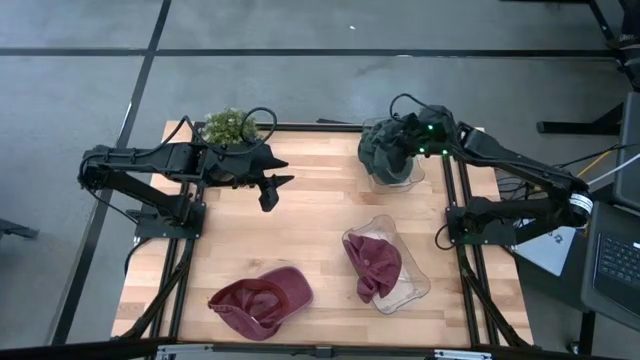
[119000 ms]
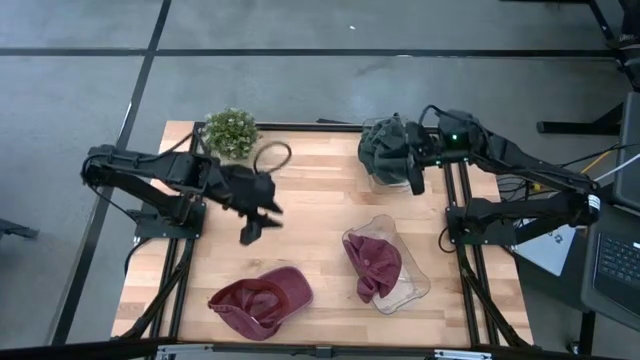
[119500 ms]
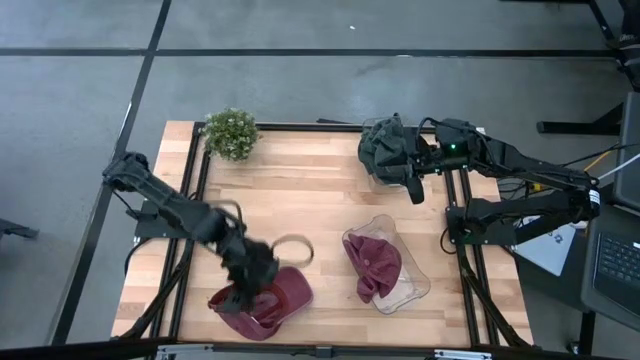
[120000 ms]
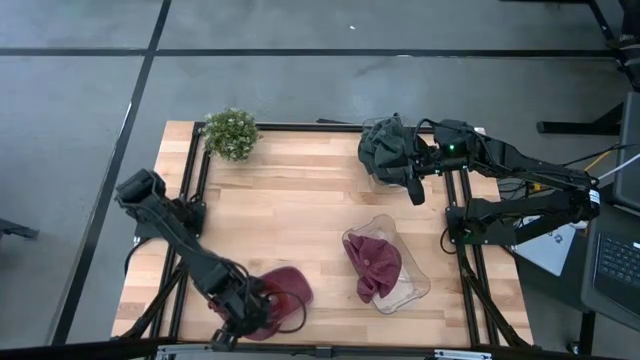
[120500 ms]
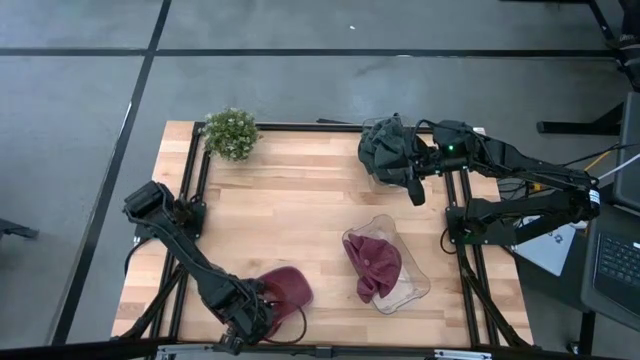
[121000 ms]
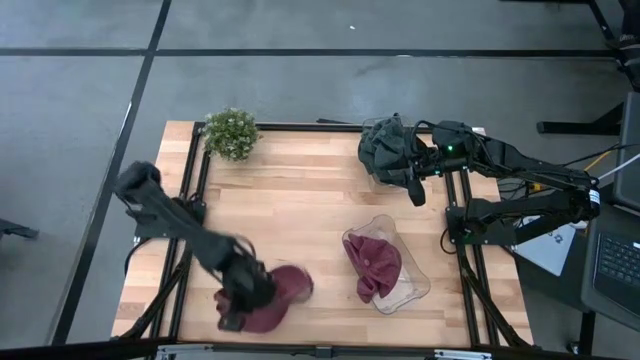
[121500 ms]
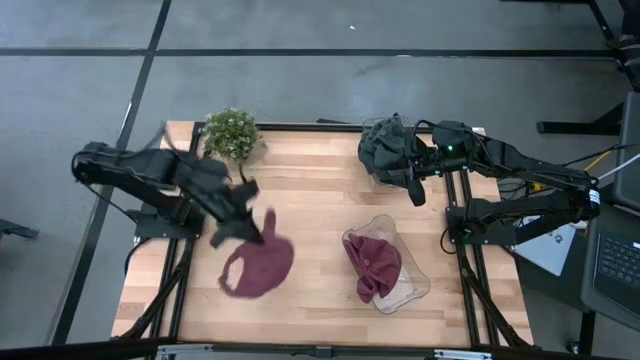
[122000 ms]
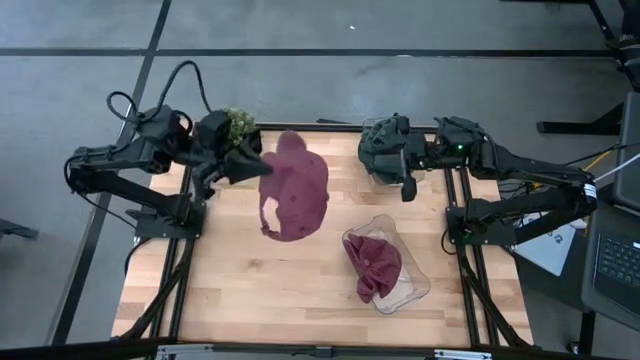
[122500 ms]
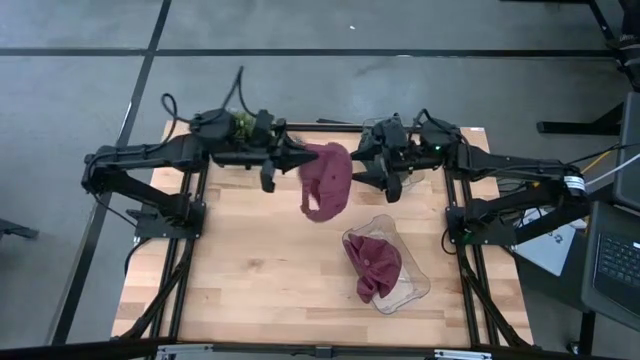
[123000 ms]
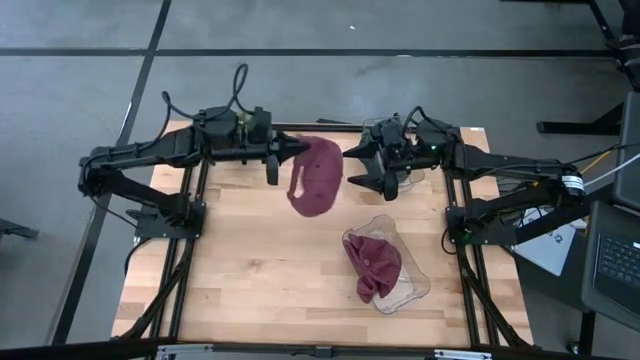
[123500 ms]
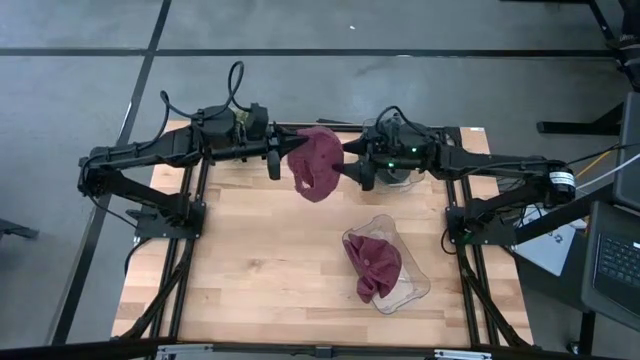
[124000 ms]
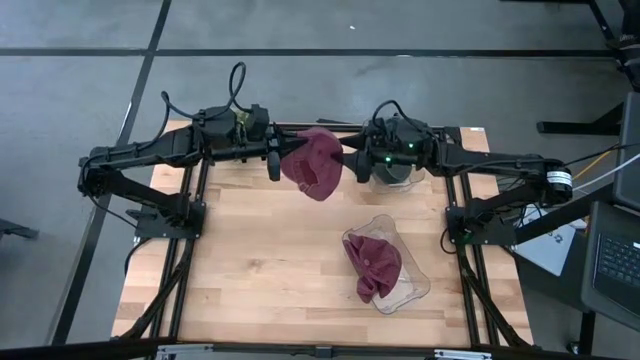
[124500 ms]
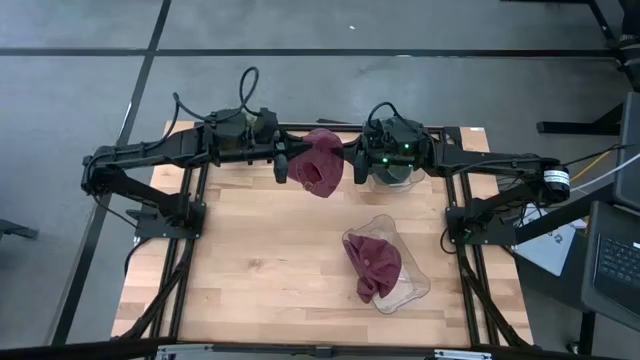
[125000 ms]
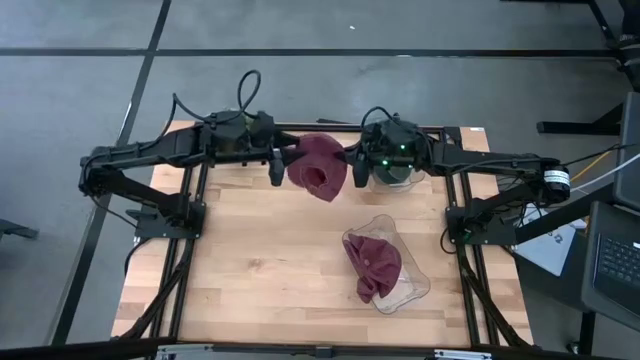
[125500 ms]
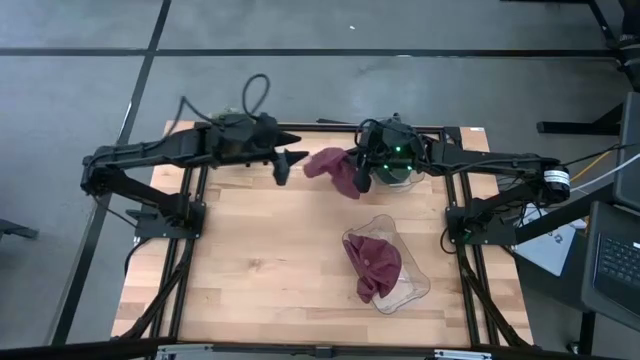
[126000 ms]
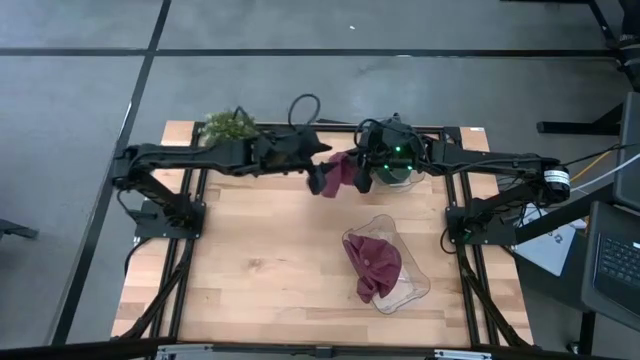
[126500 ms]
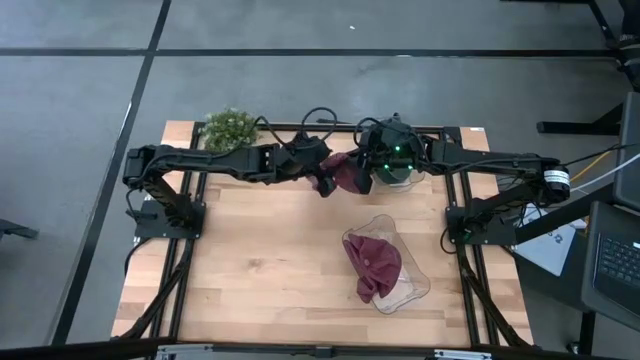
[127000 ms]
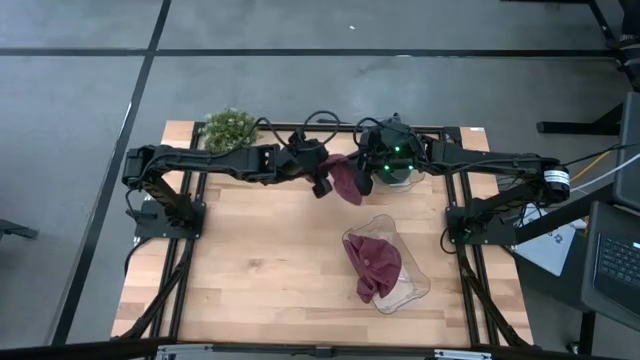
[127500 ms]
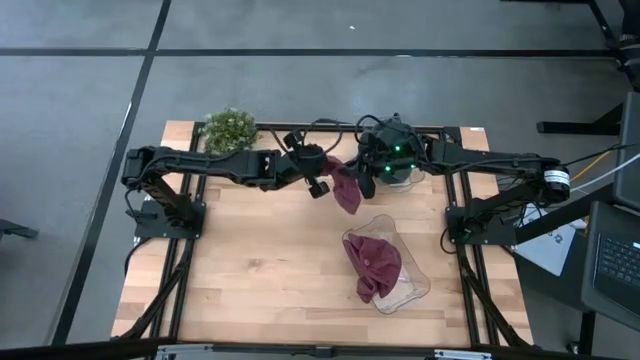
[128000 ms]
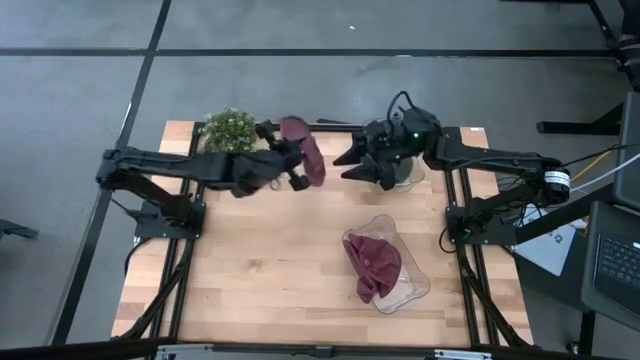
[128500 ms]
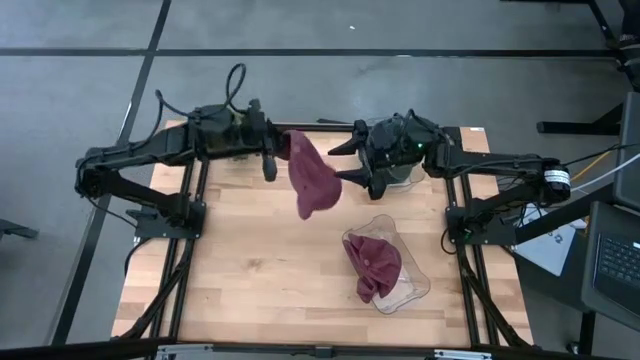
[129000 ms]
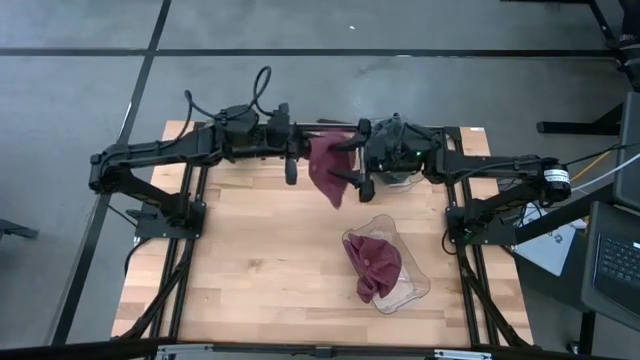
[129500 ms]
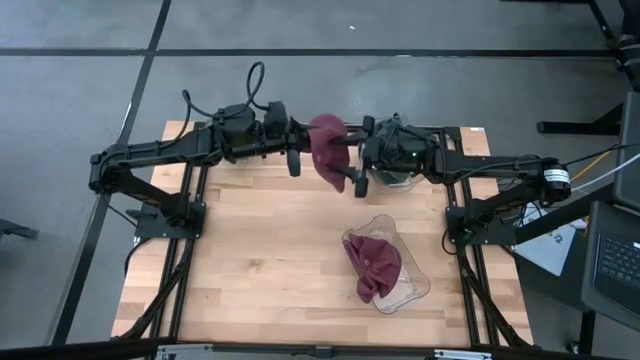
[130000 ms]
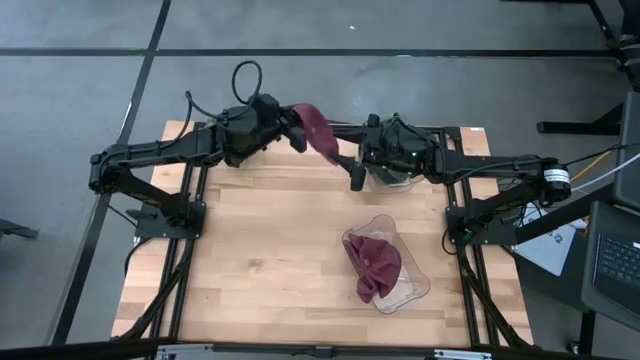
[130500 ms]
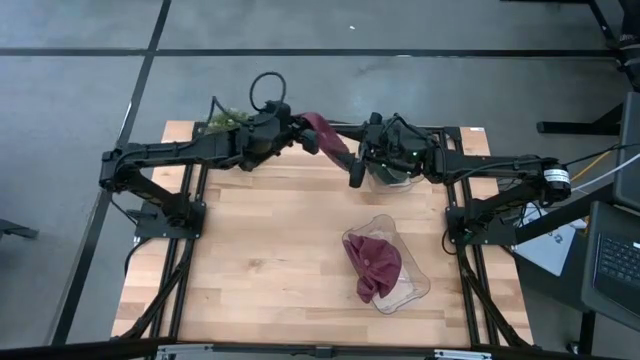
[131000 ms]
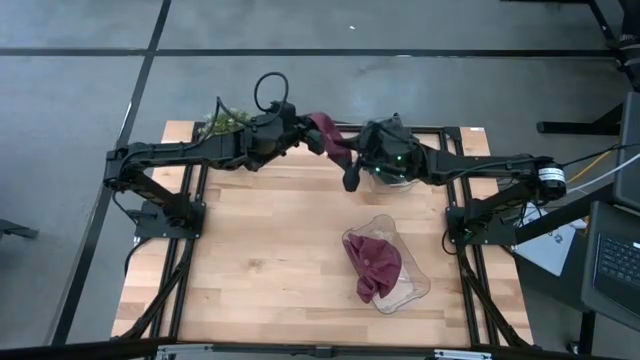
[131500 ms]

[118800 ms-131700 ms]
Task: Pick & Place hat
Put the red cap into the bottom transparent bin

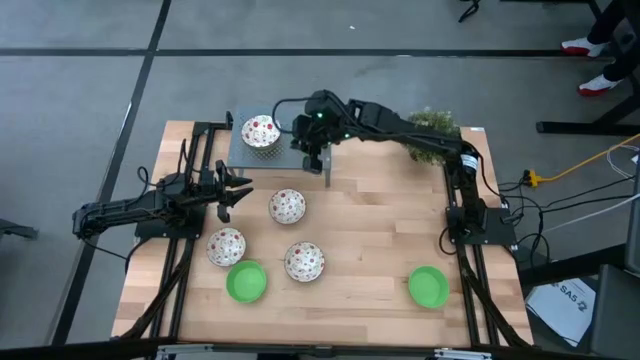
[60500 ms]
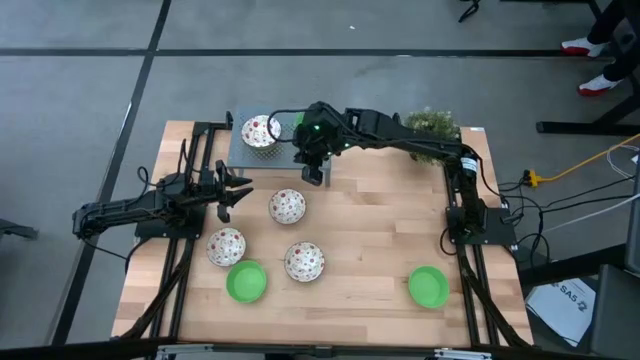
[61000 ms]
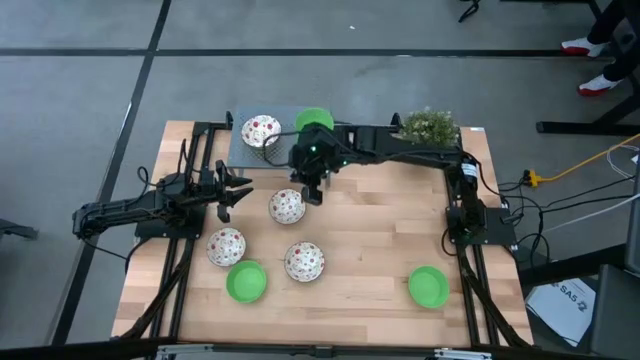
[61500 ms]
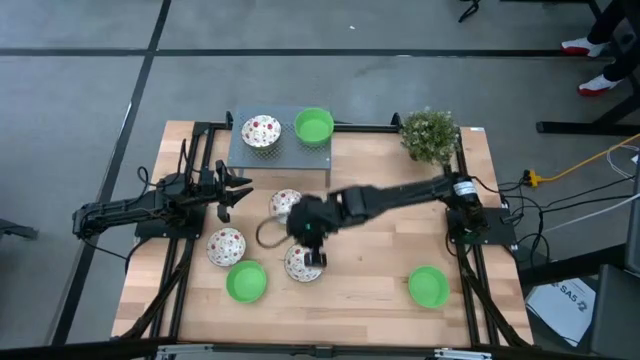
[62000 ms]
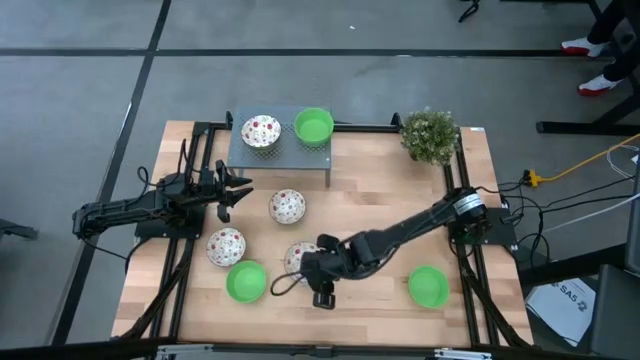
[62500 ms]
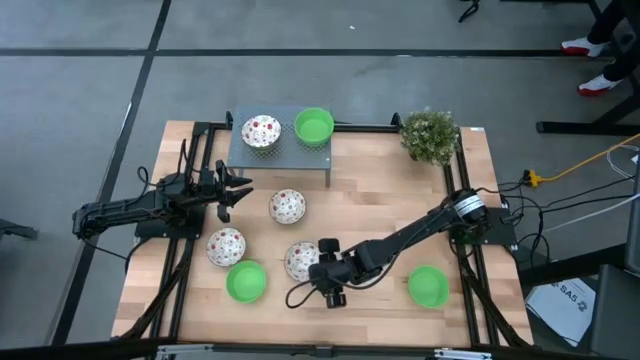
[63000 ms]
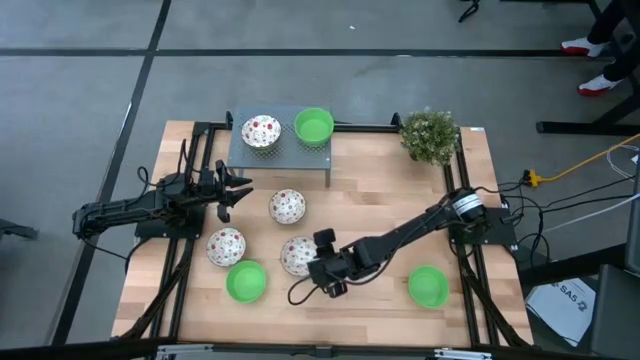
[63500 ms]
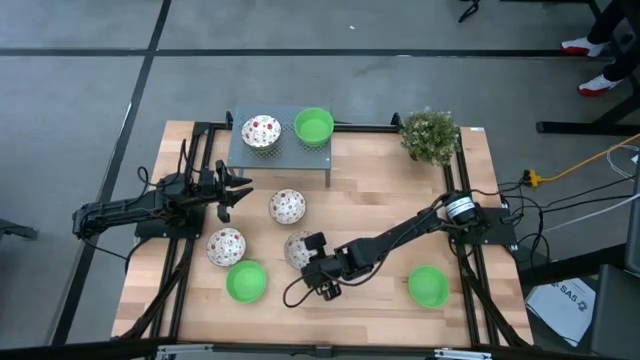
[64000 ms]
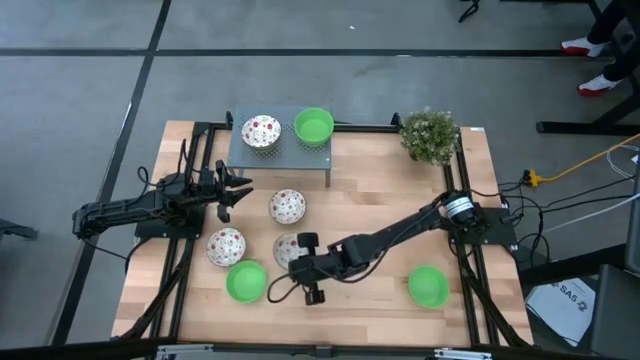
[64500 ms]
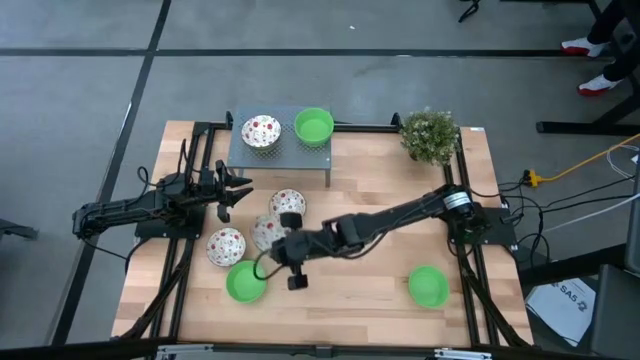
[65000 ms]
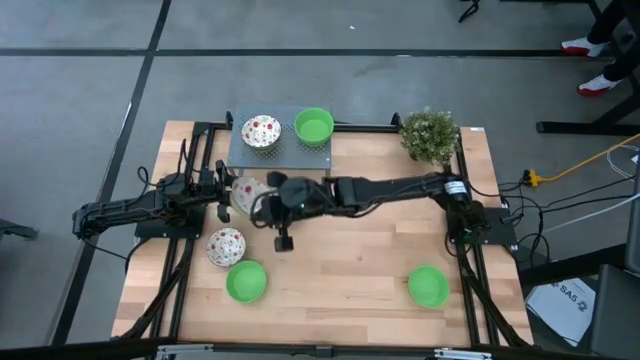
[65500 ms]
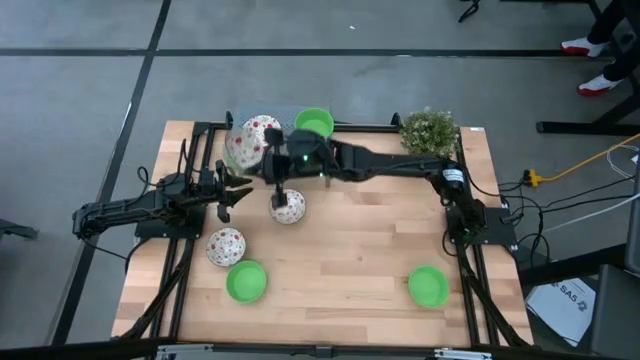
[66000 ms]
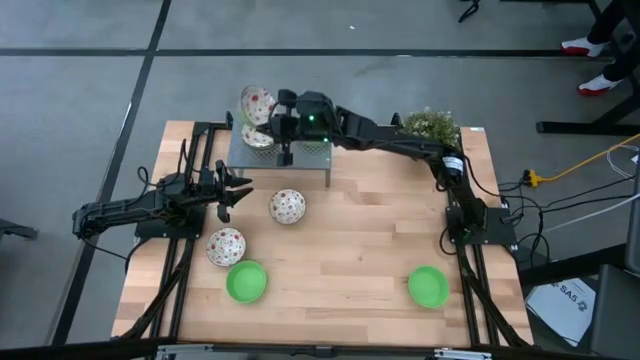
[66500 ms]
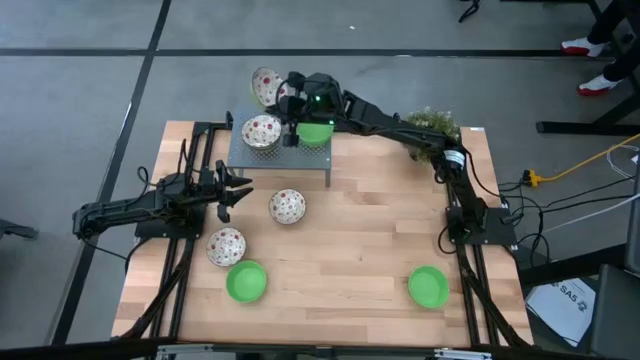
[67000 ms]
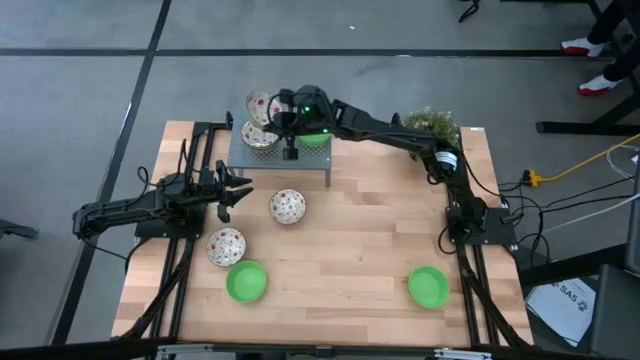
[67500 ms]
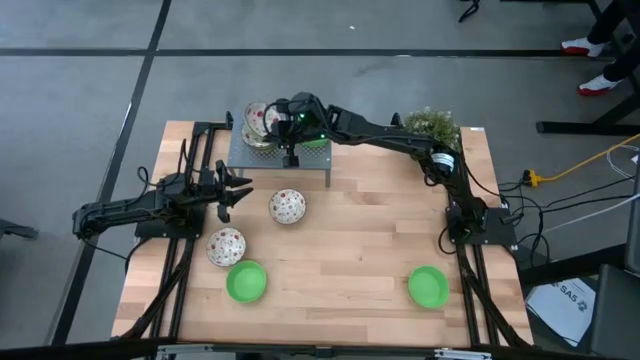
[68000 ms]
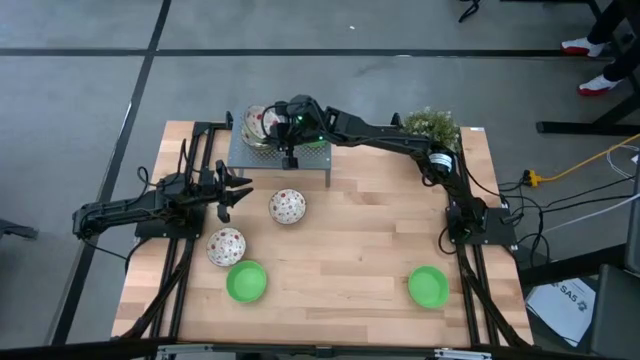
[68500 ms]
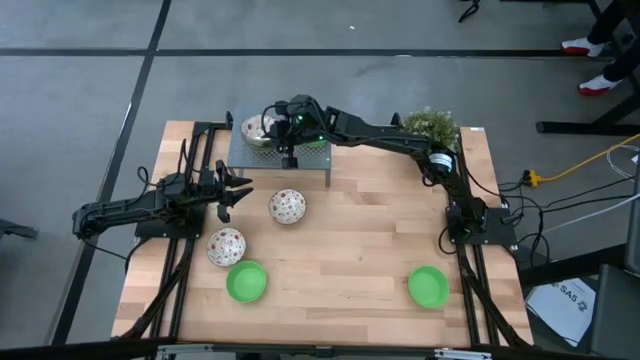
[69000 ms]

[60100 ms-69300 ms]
Task: Pick & Place Mini bowls
Stack the white bowl on top of the white bowl on the shelf
